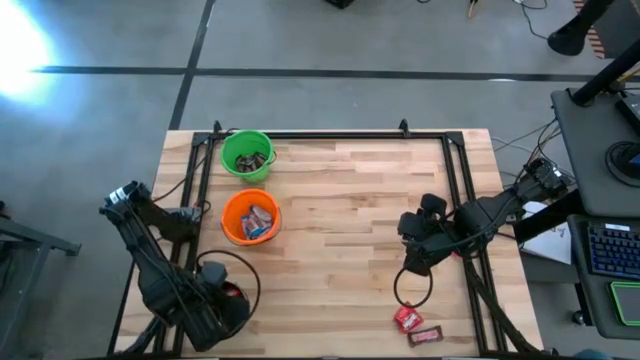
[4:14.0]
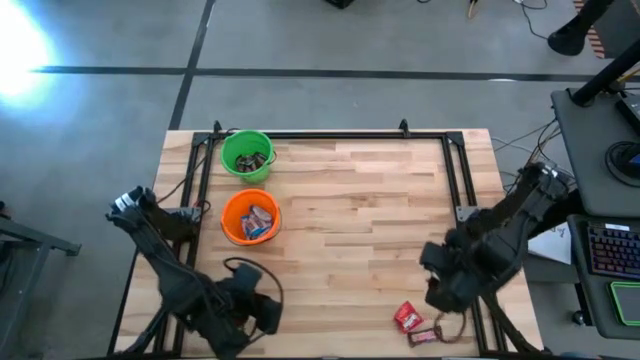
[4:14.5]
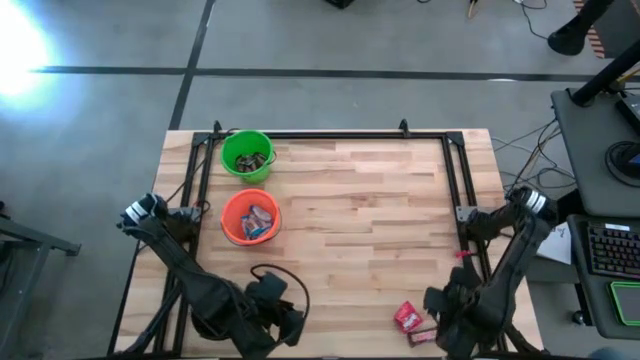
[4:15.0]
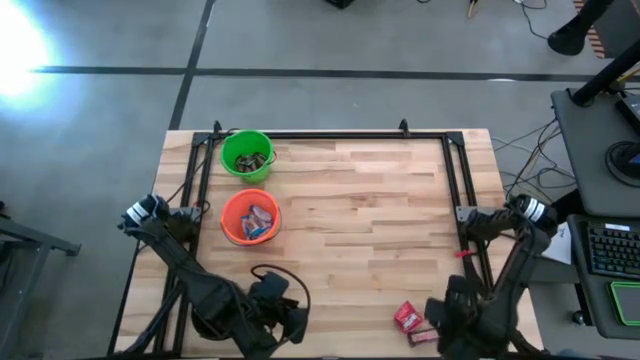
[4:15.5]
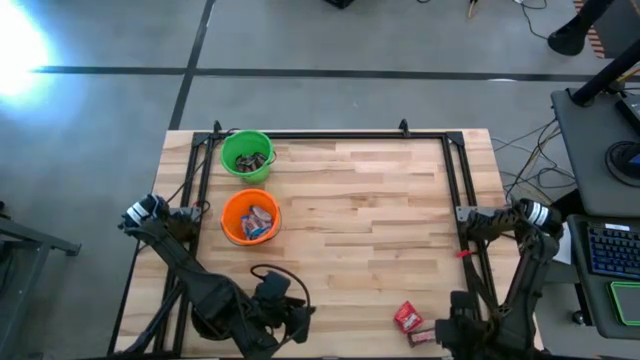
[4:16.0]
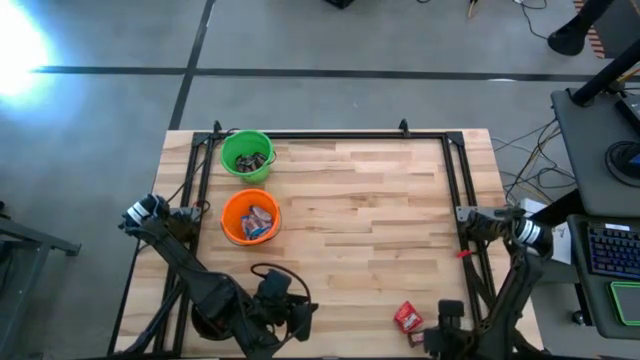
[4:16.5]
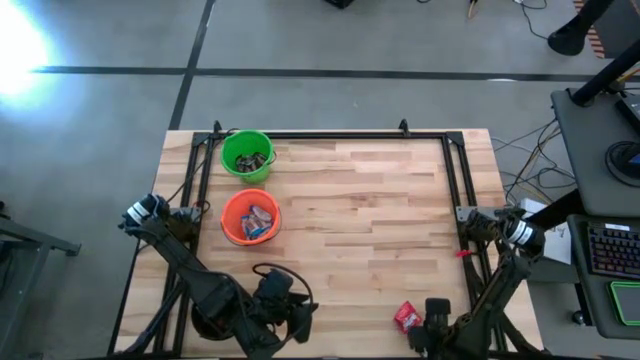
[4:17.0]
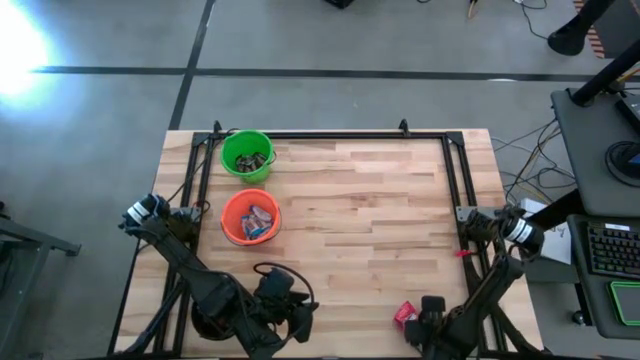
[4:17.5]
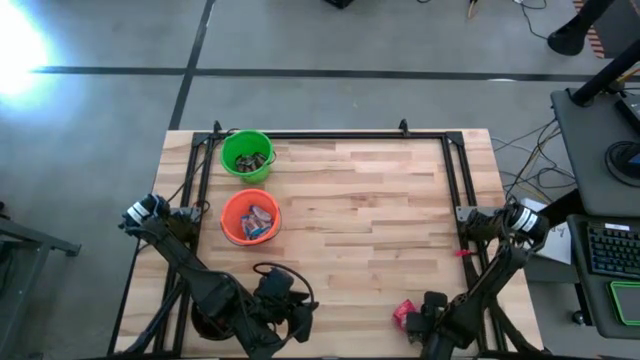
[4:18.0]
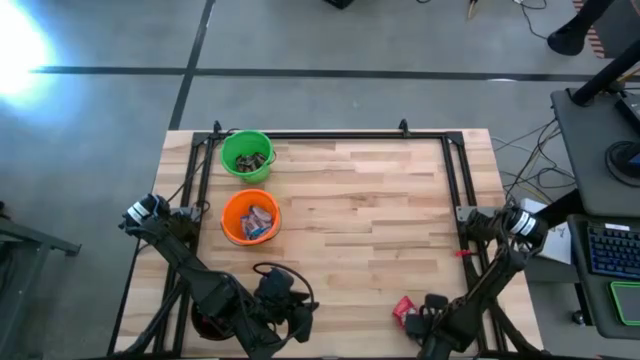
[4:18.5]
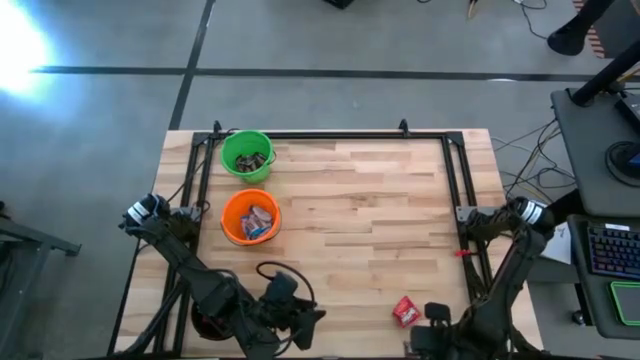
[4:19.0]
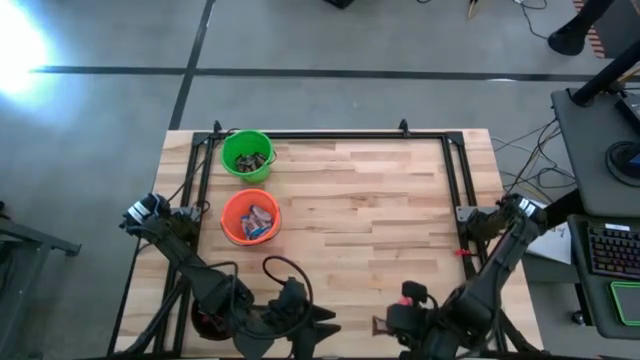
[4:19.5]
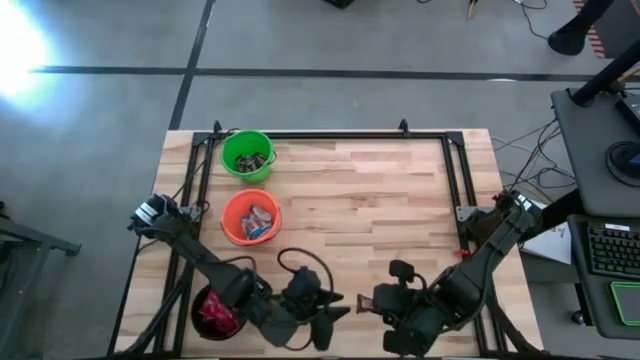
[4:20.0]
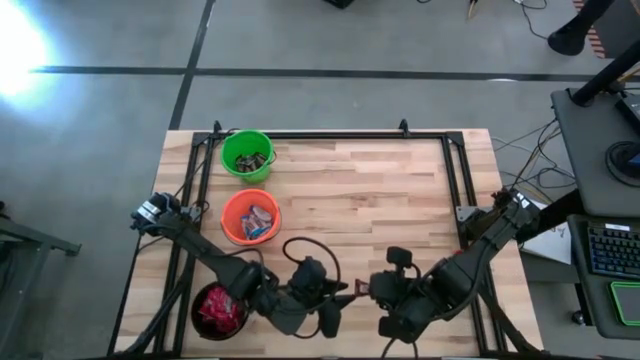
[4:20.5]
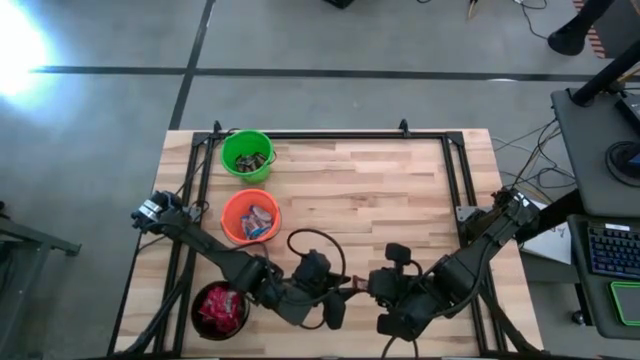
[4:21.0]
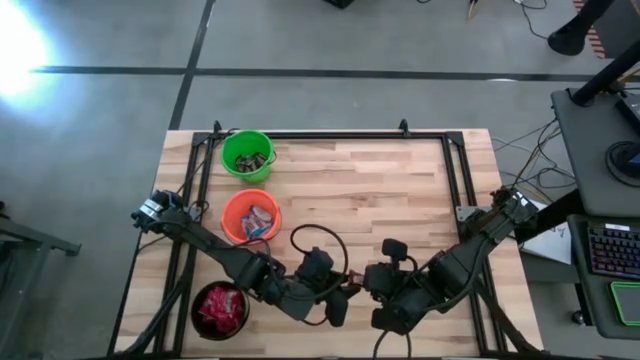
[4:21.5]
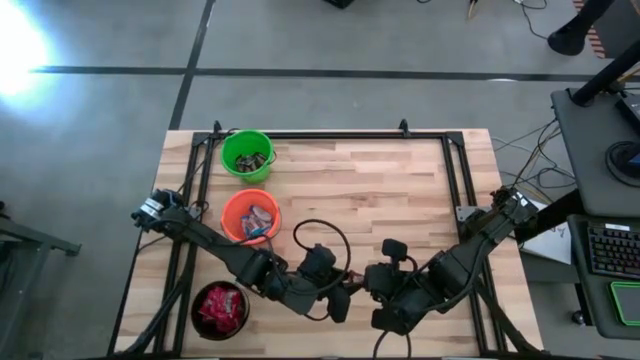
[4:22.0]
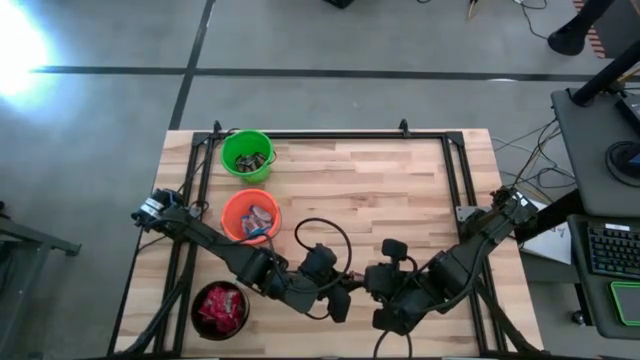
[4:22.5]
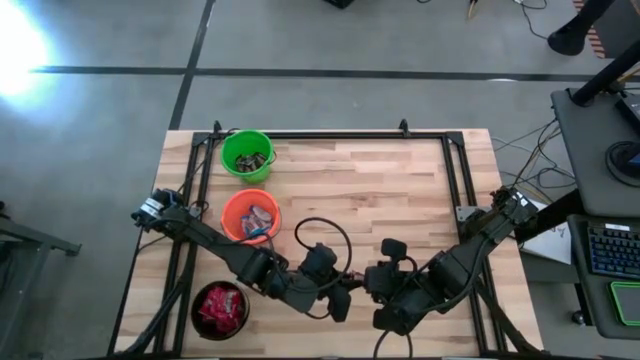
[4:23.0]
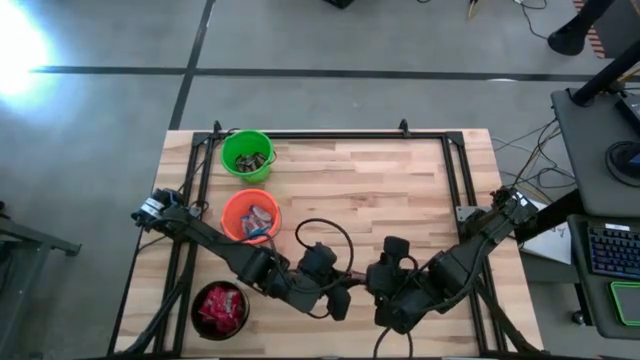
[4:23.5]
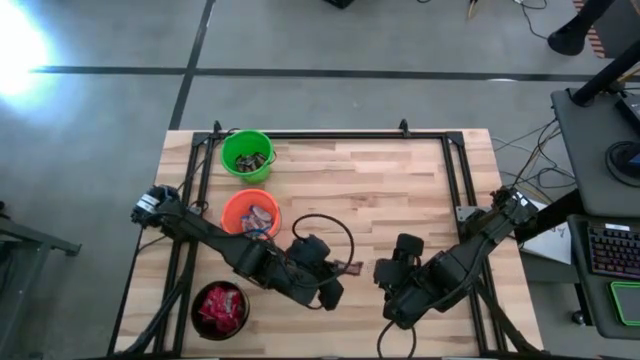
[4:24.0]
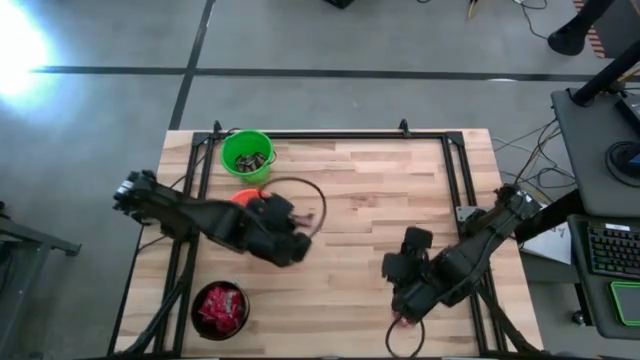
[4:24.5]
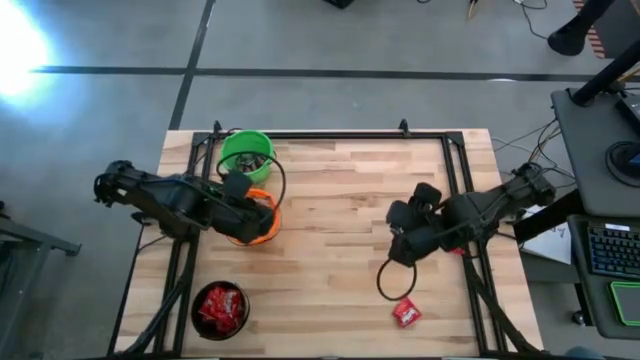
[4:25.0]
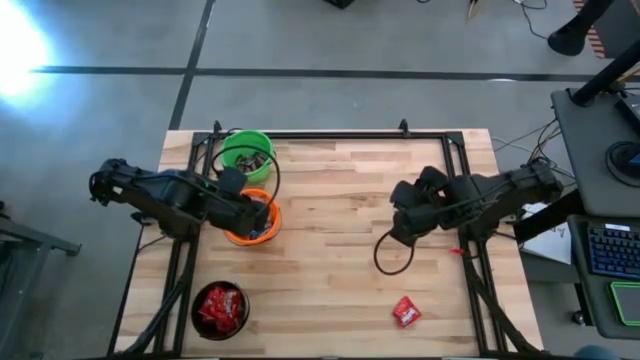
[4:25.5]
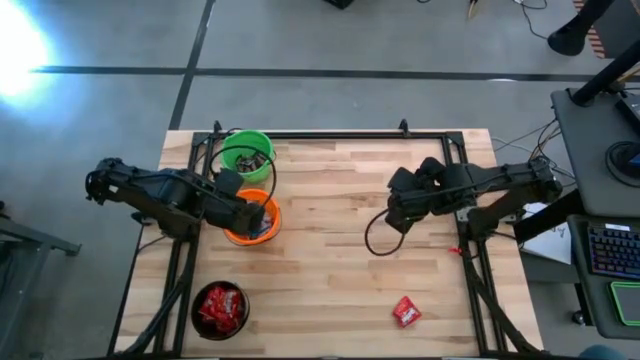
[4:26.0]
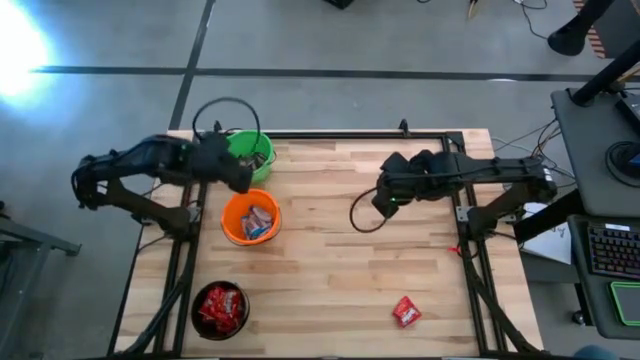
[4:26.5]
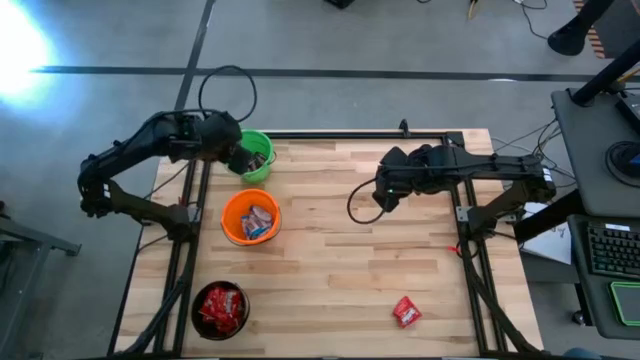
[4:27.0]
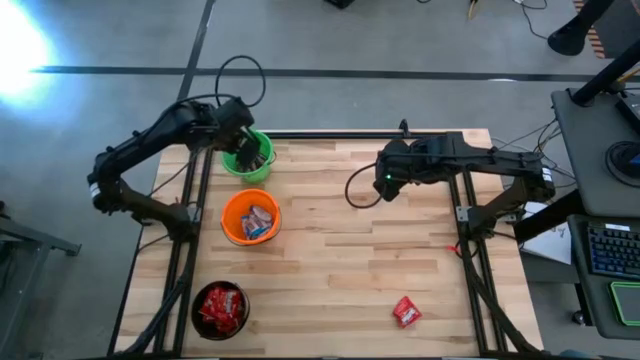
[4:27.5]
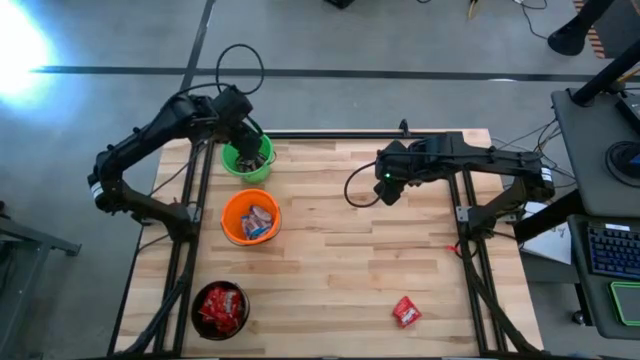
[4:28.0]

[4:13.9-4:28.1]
Task: Organize candy in baskets
Put the brown chocolate into the green bucket

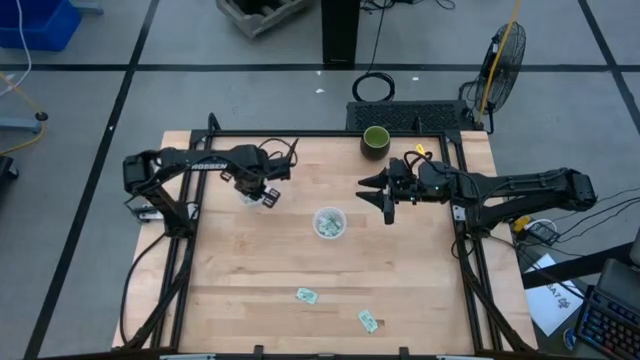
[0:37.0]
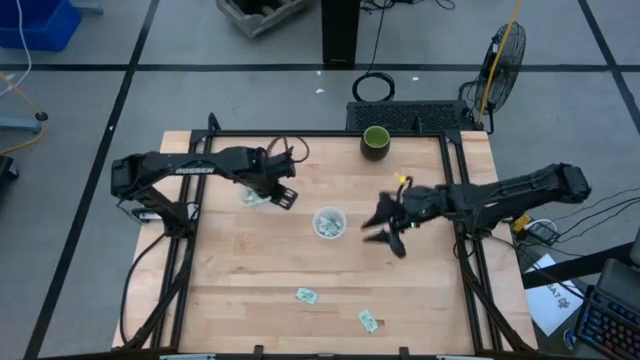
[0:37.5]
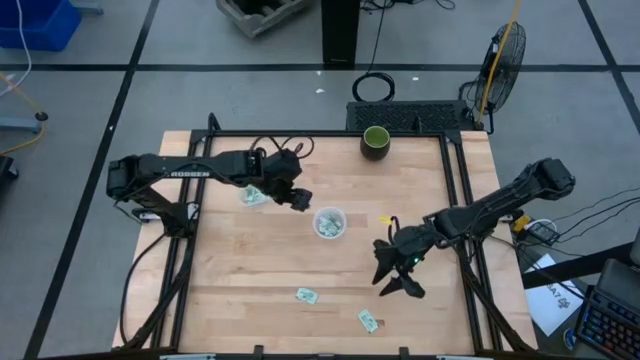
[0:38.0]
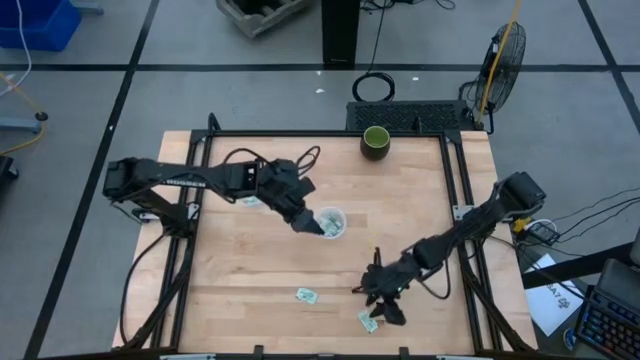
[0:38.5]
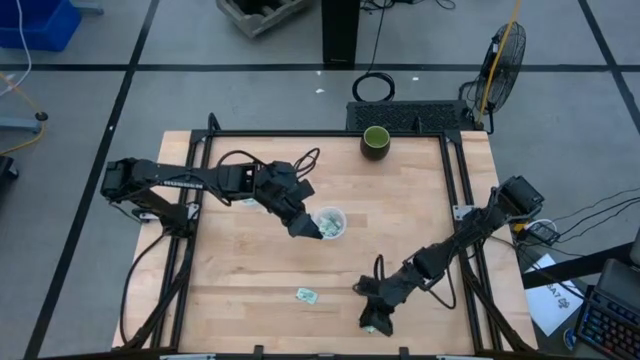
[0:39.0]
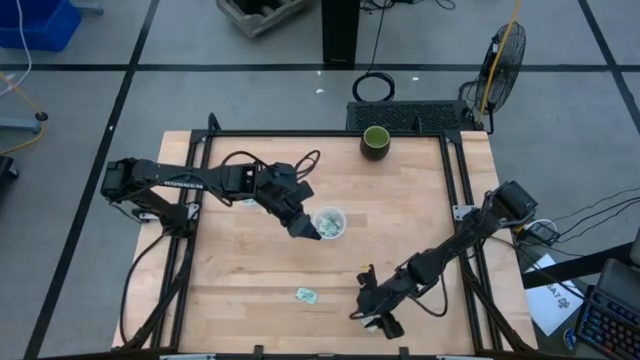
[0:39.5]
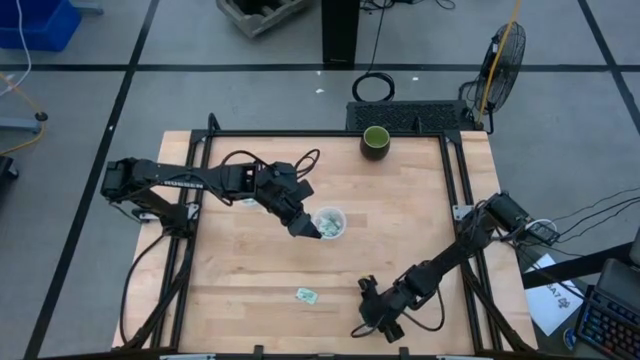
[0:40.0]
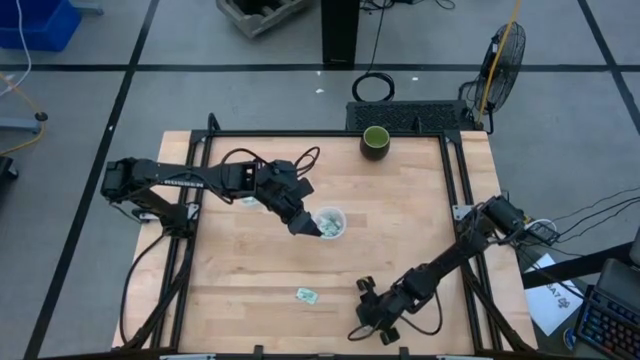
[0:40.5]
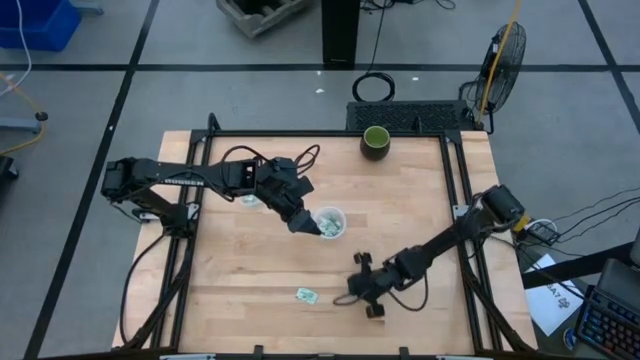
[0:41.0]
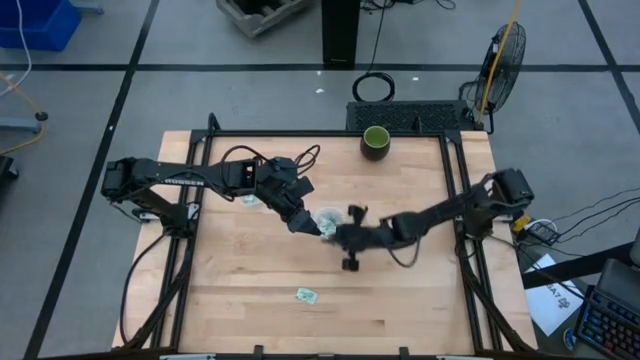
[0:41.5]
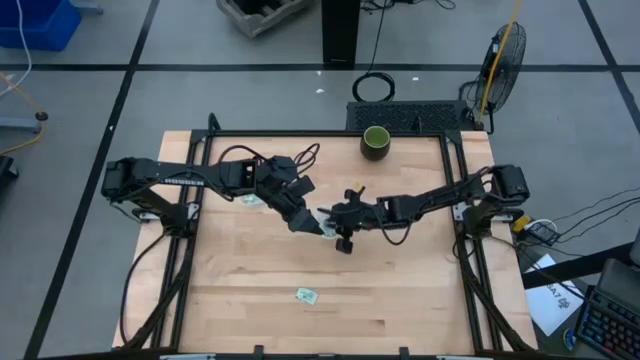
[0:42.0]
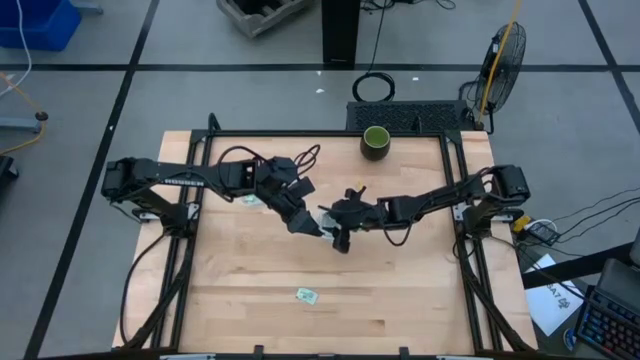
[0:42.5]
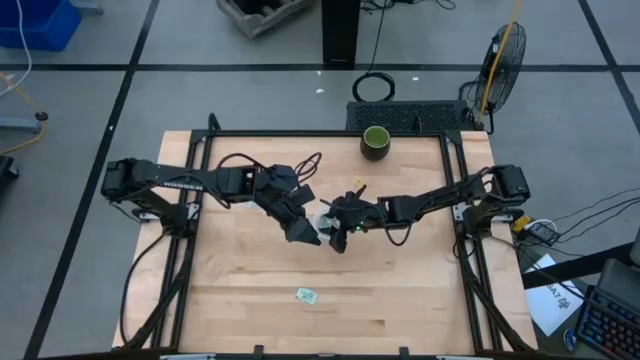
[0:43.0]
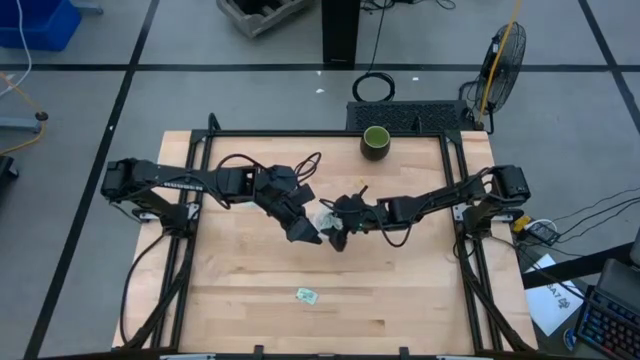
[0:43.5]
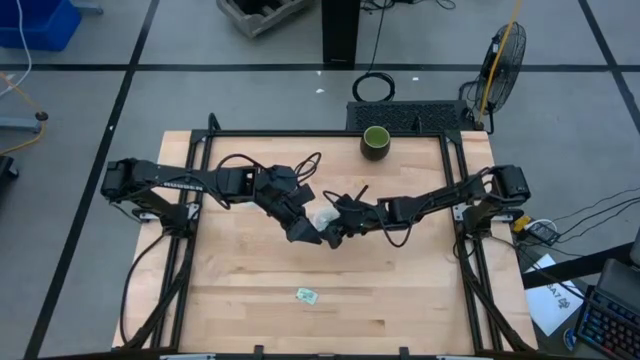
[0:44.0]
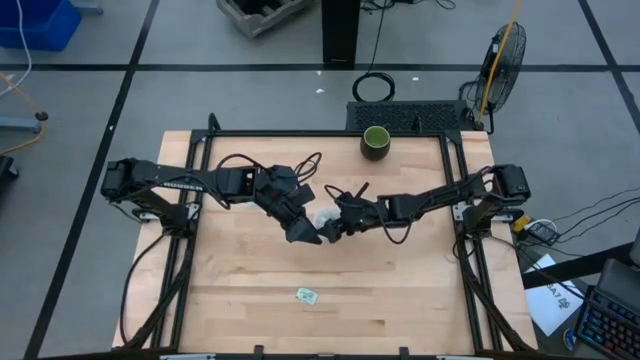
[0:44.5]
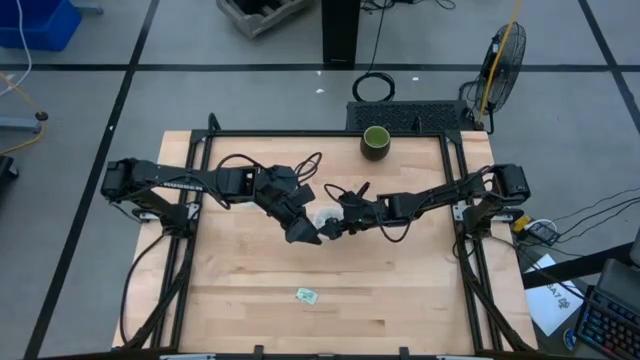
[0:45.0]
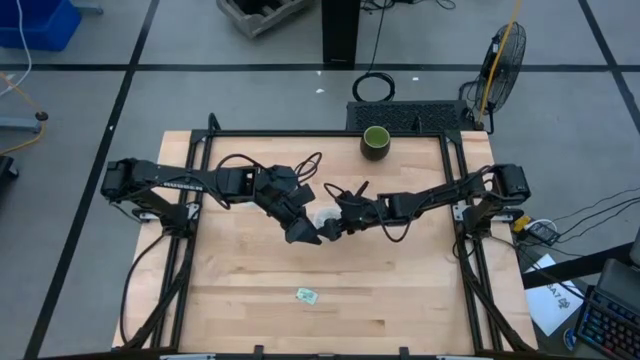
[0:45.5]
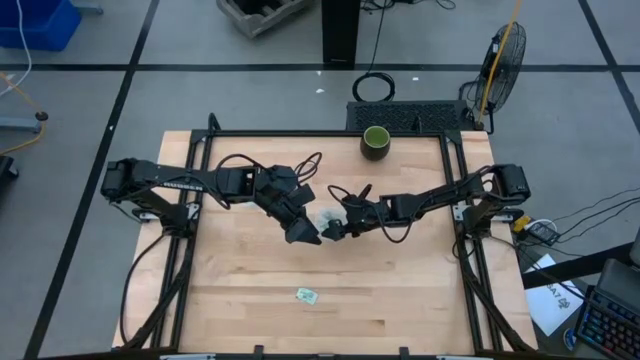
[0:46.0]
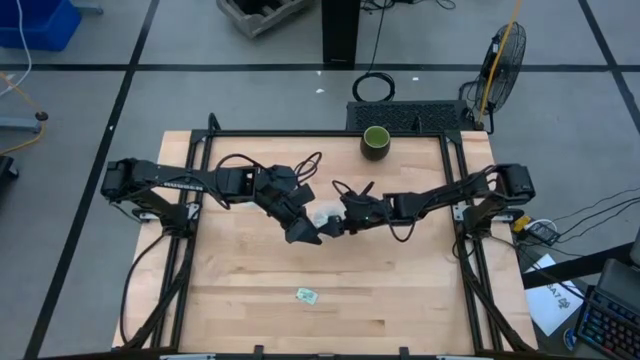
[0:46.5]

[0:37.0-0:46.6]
Task: Pick and place items into bin
Put the stevia packet into the left transparent bin
